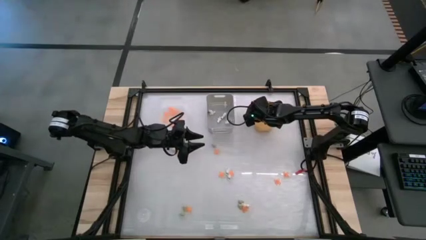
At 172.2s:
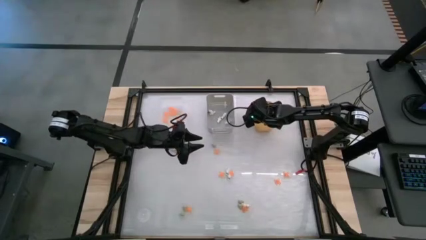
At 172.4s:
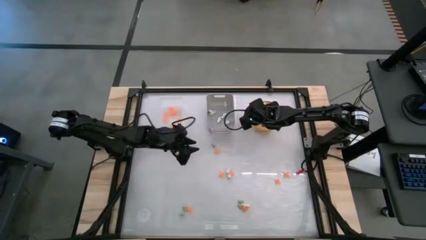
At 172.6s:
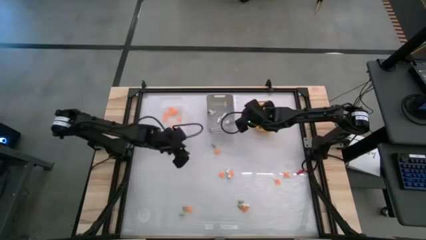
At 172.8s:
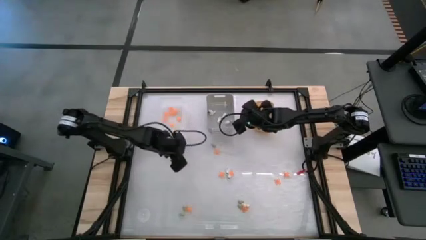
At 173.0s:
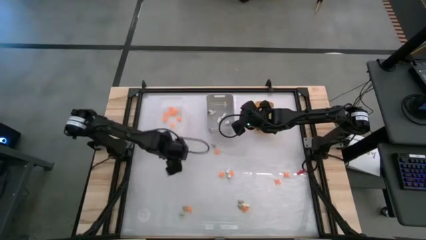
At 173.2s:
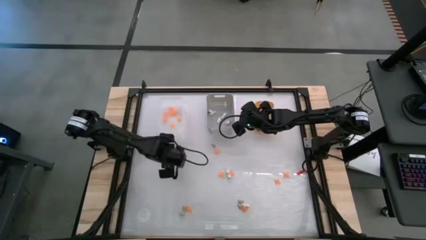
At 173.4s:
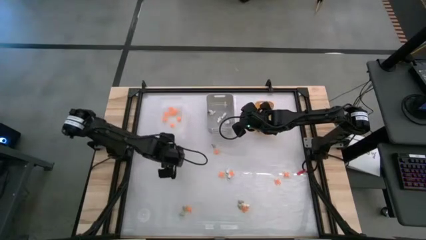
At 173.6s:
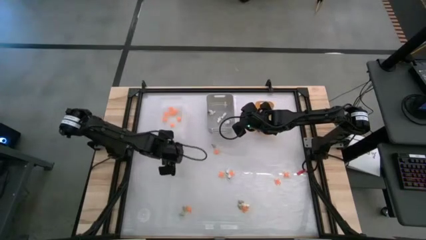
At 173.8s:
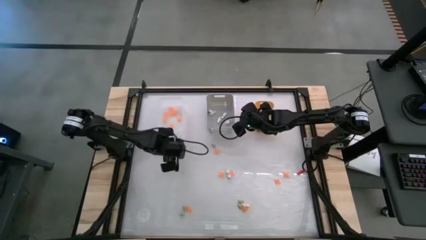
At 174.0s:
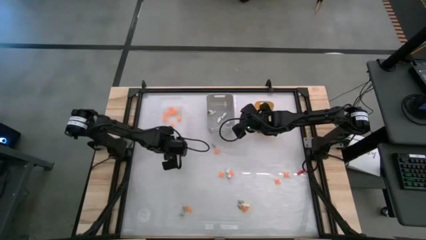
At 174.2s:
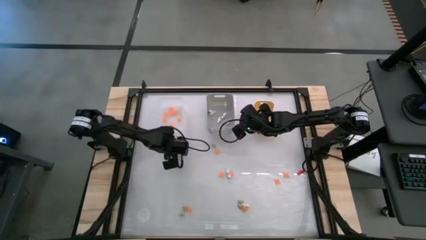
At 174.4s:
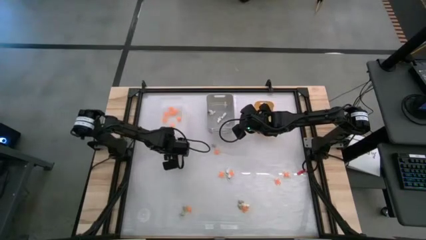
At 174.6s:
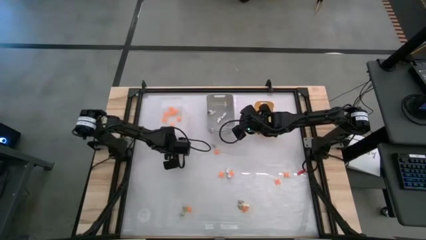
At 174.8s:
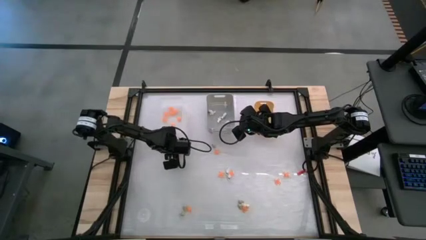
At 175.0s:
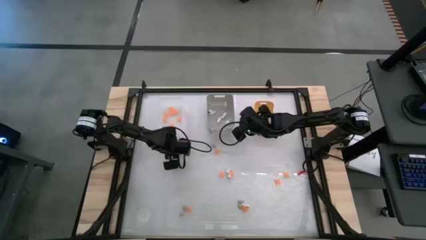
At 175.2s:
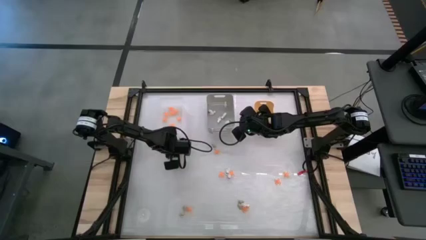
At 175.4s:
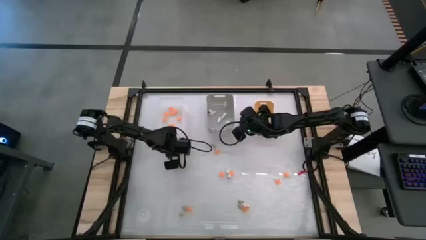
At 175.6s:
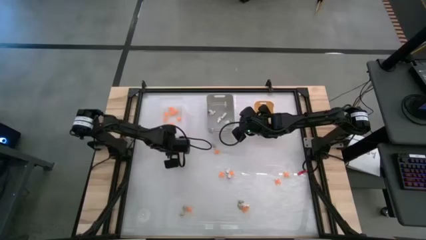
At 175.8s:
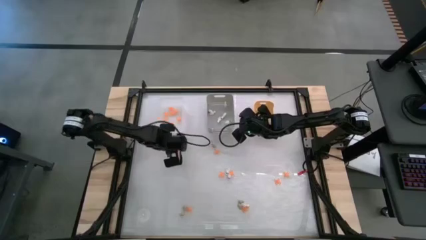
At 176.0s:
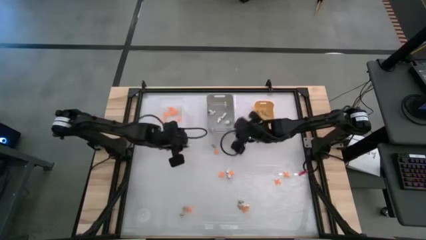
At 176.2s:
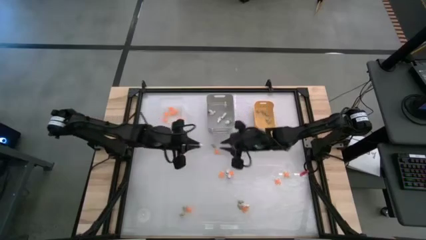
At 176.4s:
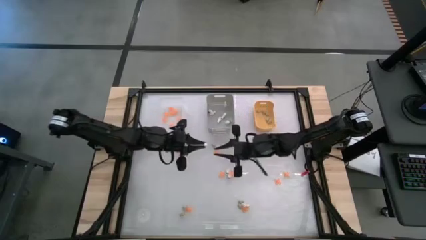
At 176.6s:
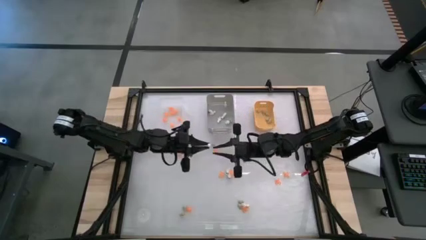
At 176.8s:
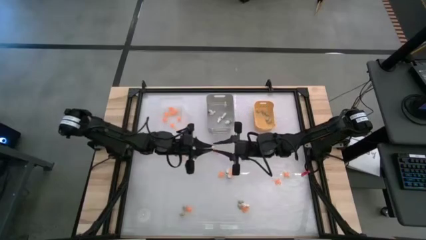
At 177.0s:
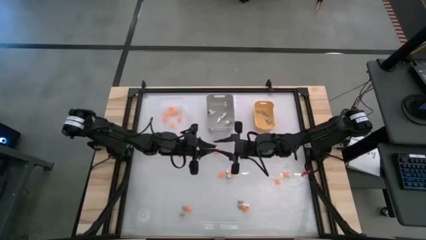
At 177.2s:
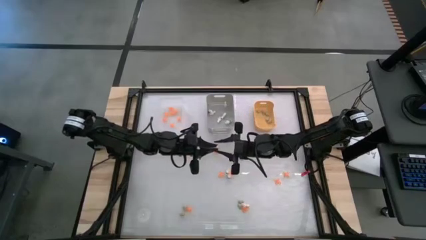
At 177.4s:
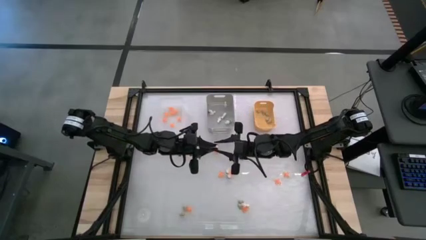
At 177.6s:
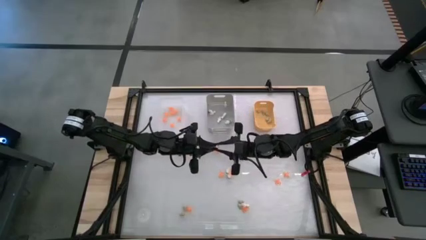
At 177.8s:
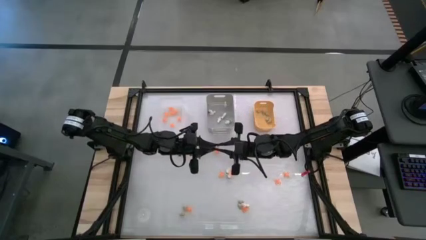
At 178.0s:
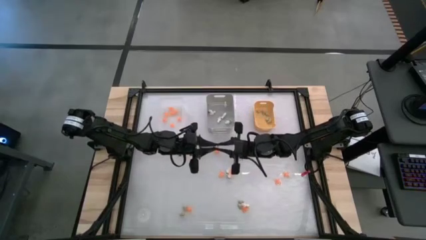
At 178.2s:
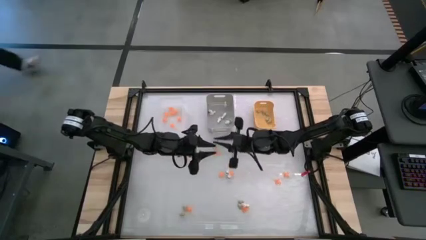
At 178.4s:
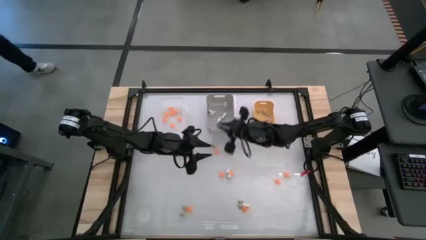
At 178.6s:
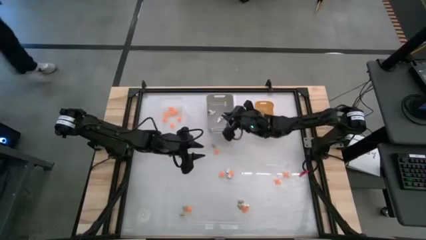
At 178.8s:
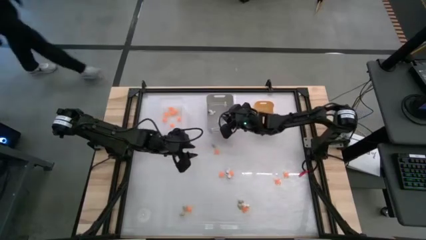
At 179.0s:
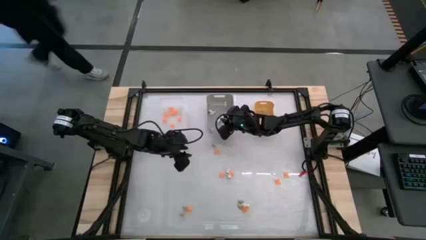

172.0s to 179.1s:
Task: Sort Halloween decoration
Put the white skeleton toy into the gray bin

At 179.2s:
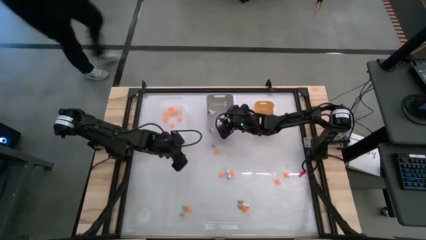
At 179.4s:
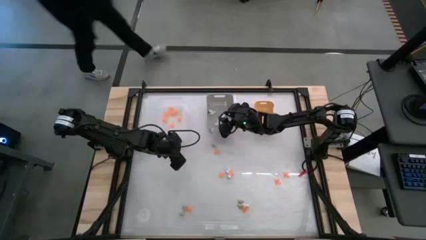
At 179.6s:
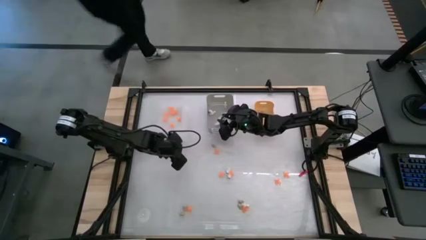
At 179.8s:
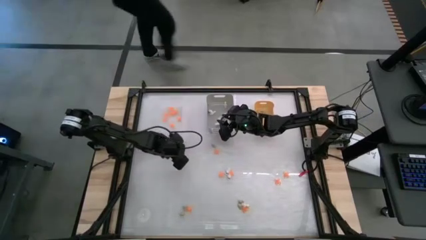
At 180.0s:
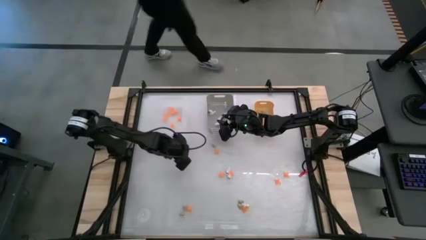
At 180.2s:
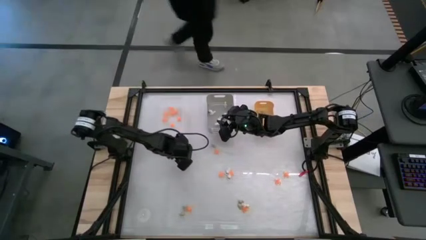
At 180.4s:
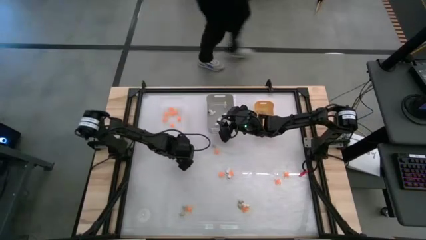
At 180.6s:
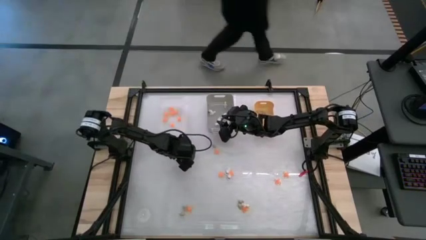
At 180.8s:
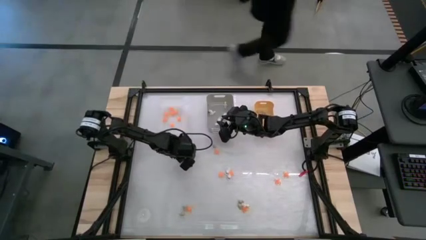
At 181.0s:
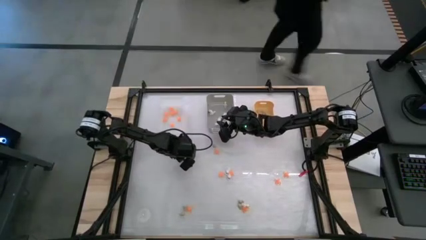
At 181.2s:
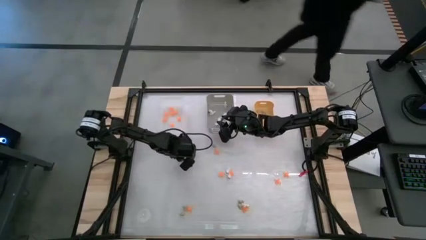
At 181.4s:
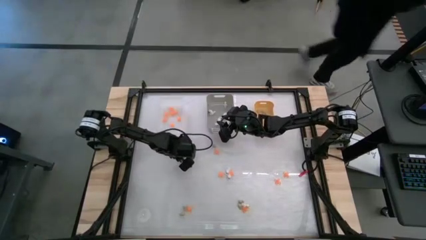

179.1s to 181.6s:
Put the orange spider toy into the transparent white bin

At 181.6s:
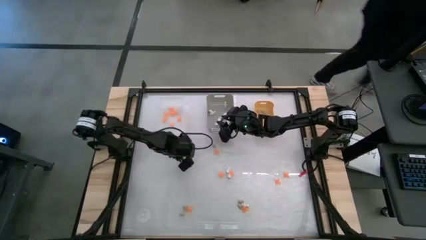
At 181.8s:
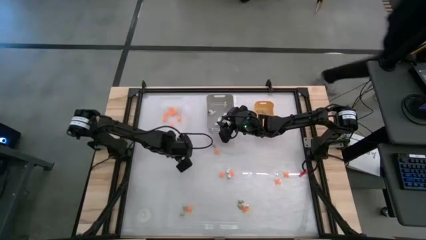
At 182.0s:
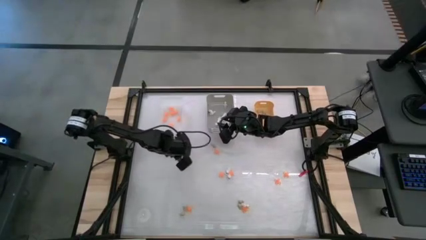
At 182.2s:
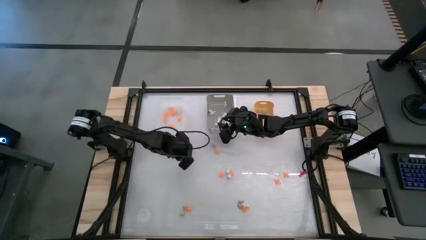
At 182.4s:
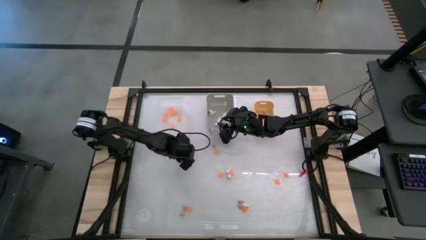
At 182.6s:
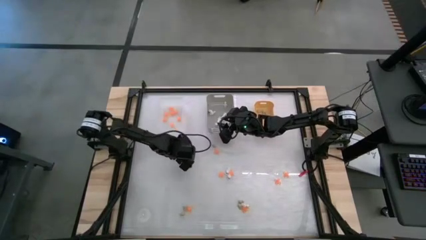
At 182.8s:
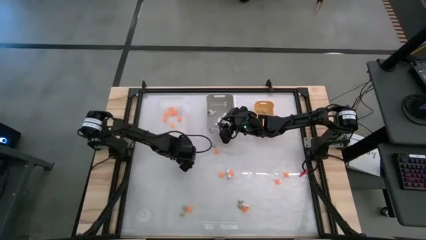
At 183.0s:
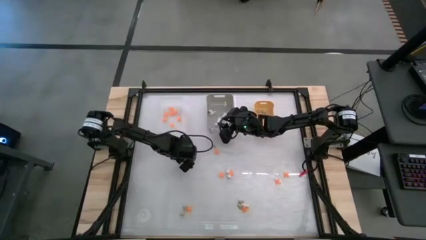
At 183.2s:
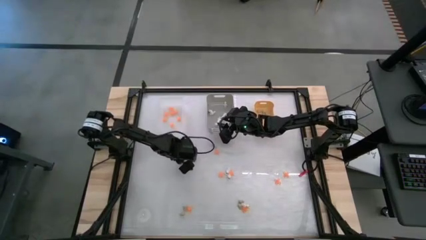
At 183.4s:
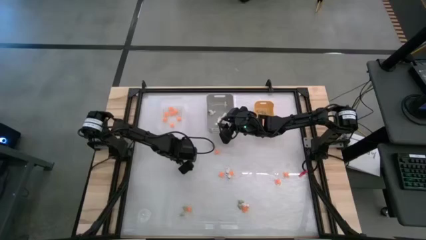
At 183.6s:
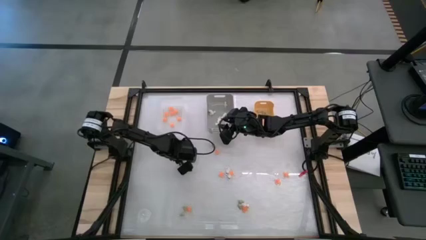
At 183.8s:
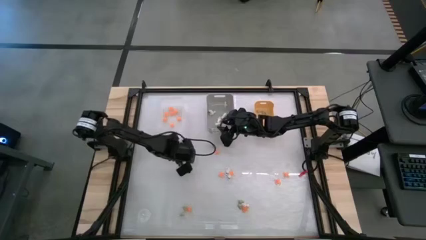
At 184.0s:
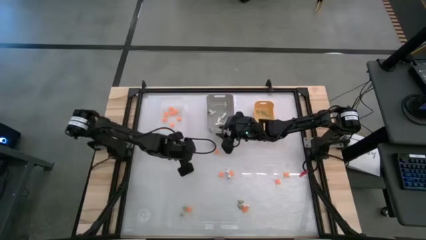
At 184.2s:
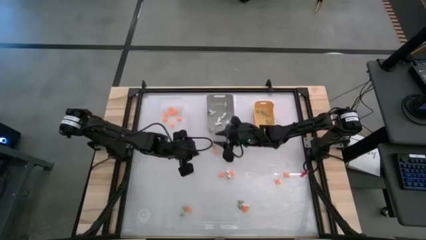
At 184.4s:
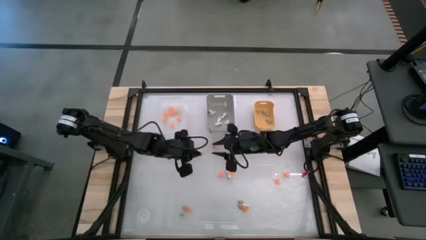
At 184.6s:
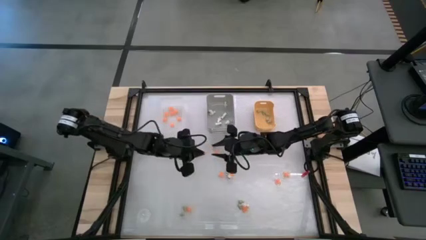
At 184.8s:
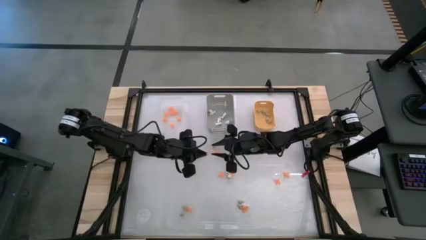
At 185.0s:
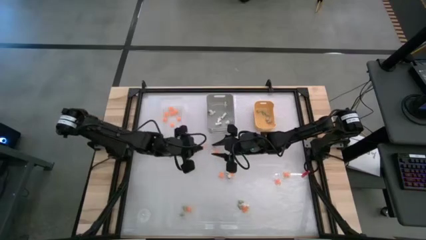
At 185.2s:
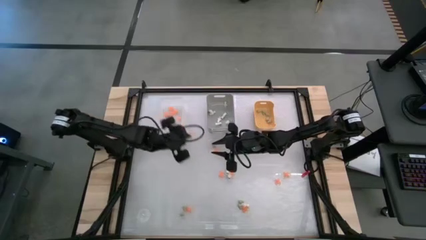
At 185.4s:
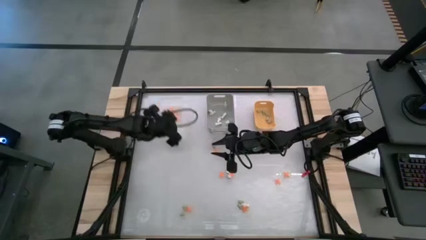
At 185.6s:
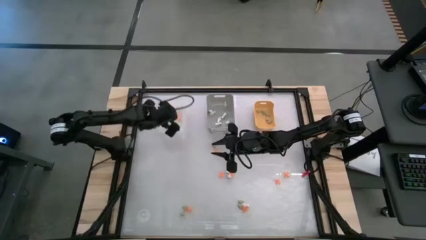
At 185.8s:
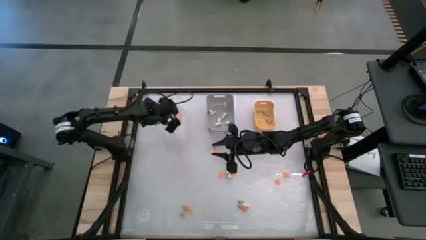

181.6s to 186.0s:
Put the orange spider toy into the transparent white bin

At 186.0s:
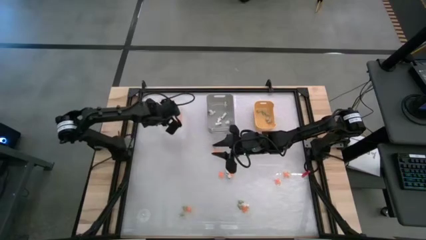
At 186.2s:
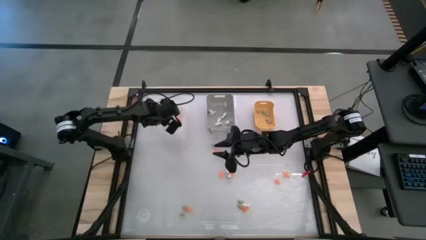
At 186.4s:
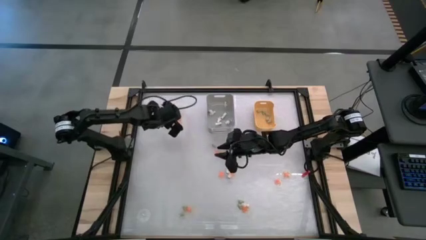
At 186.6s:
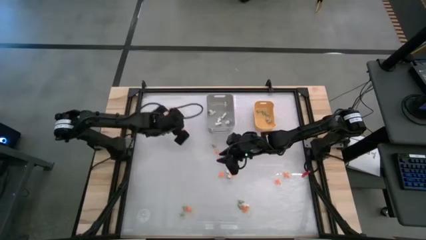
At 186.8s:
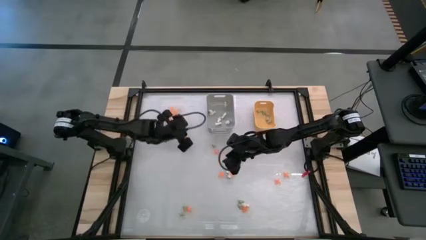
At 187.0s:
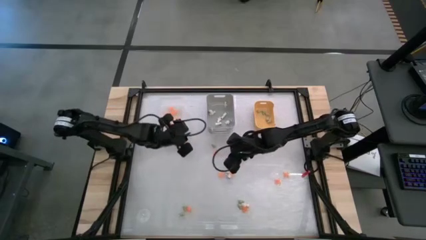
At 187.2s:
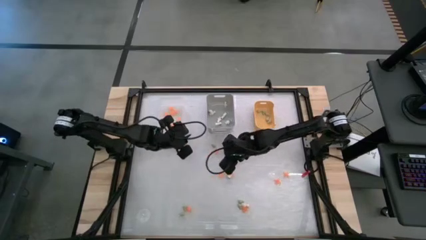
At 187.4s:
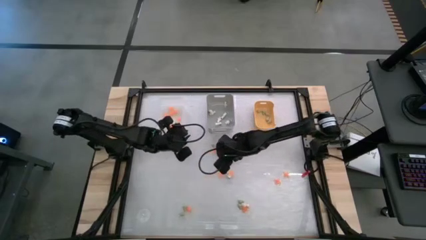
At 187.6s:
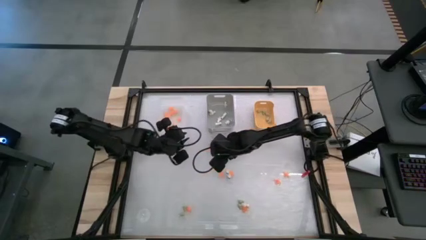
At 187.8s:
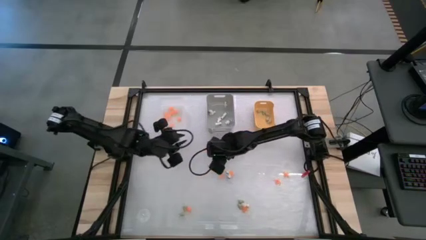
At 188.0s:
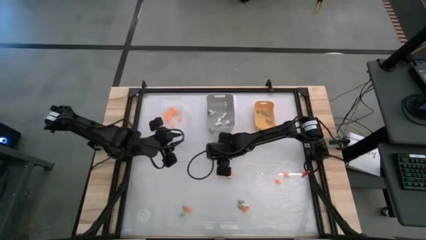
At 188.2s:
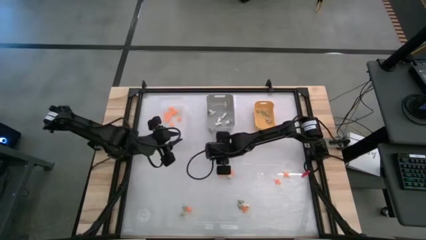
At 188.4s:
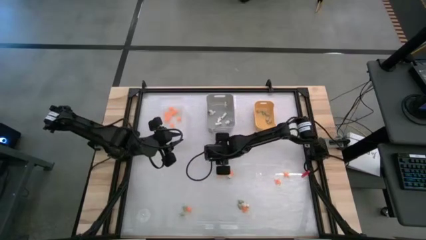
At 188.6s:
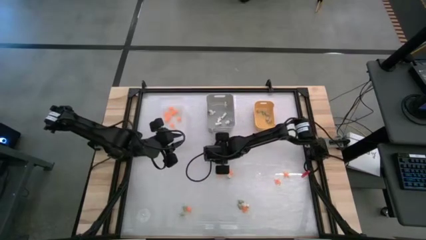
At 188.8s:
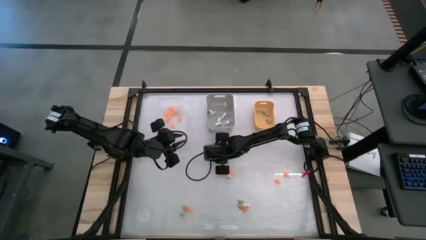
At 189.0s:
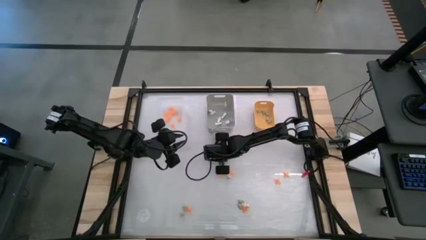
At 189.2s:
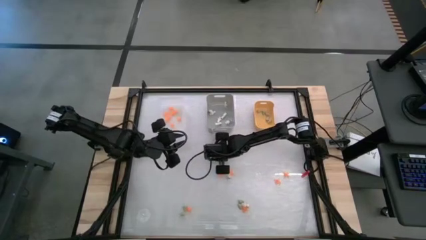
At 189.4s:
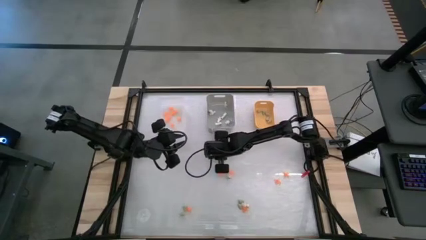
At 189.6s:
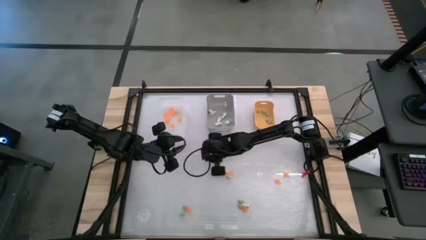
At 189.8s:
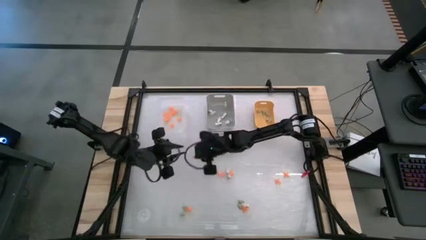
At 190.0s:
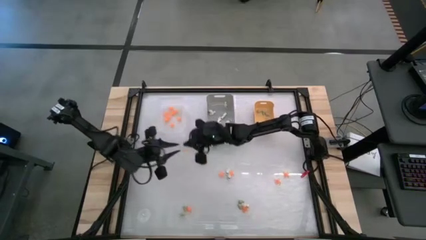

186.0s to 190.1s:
Put the orange spider toy into the transparent white bin
